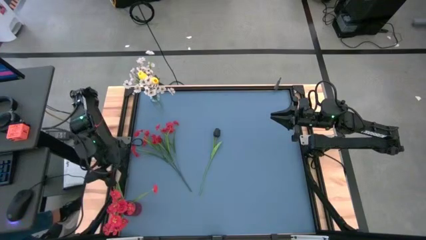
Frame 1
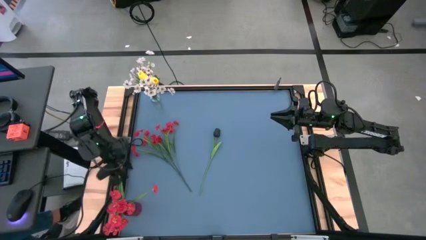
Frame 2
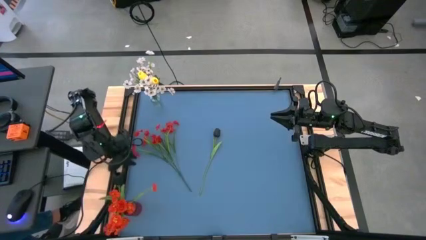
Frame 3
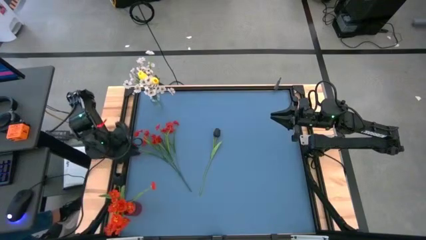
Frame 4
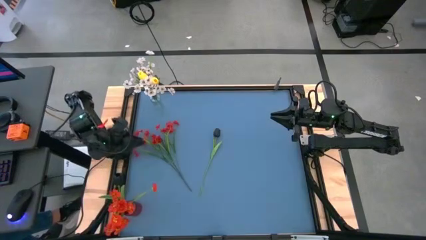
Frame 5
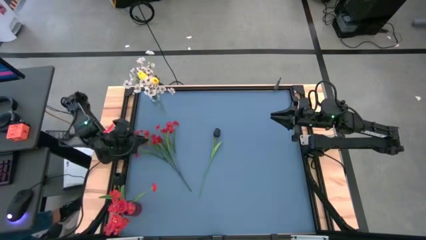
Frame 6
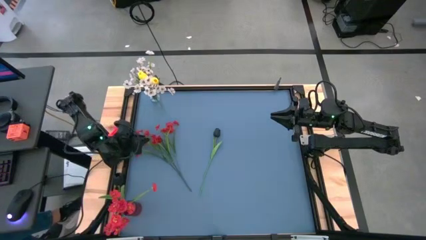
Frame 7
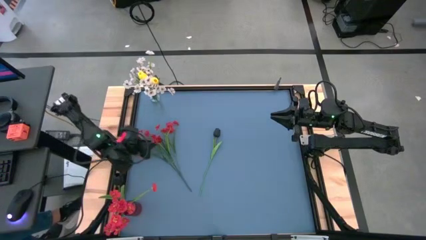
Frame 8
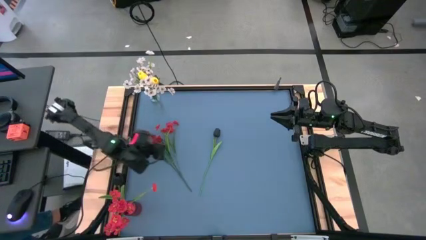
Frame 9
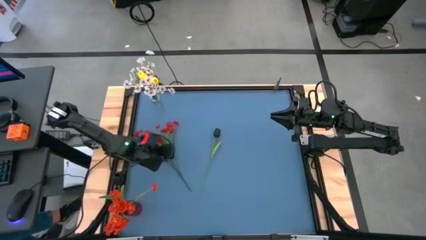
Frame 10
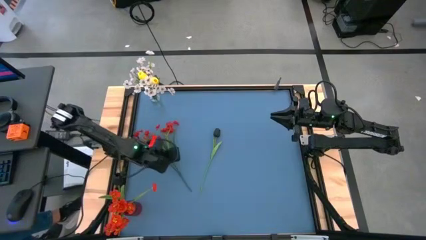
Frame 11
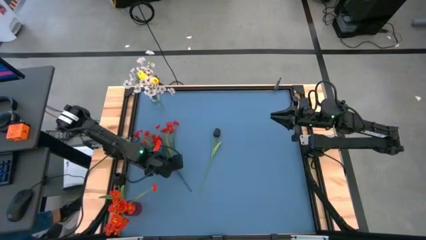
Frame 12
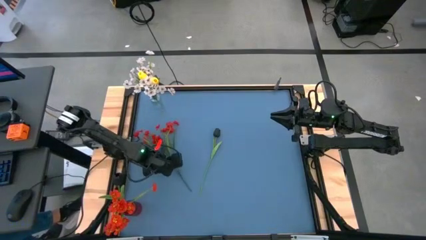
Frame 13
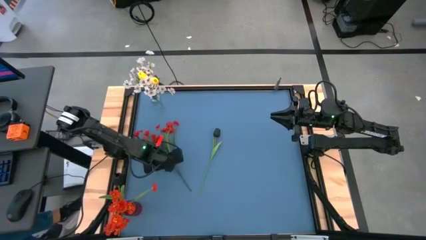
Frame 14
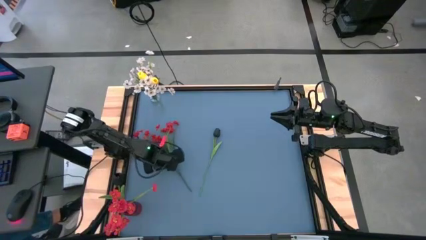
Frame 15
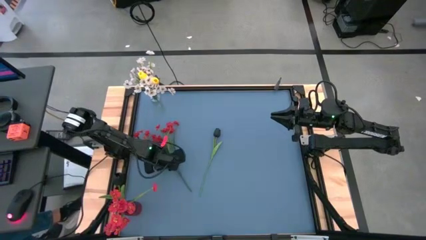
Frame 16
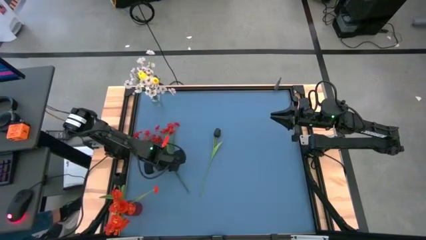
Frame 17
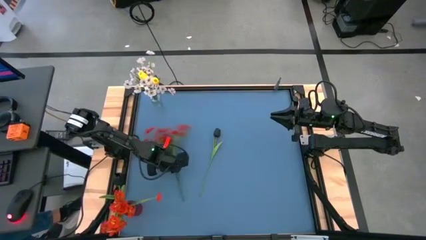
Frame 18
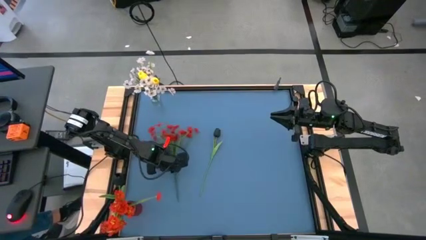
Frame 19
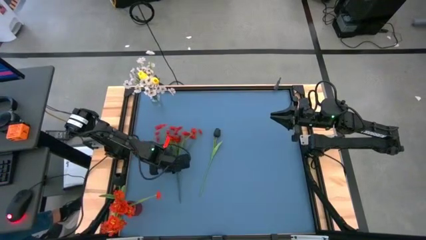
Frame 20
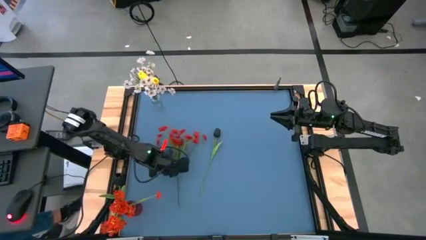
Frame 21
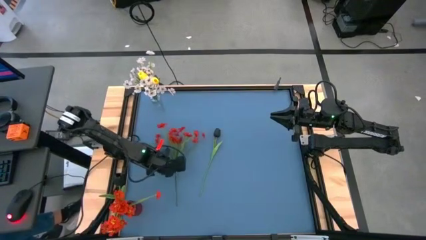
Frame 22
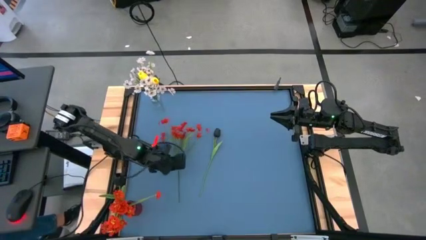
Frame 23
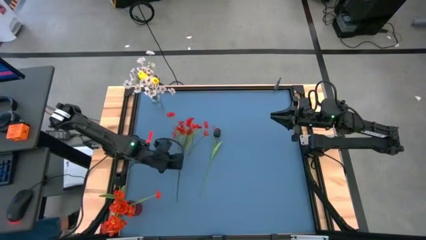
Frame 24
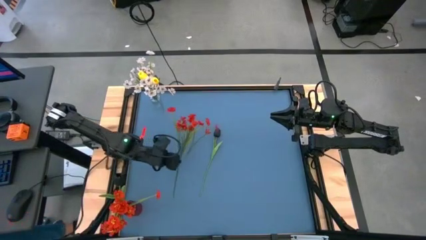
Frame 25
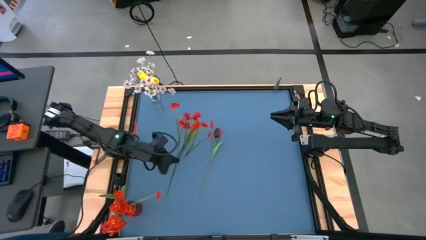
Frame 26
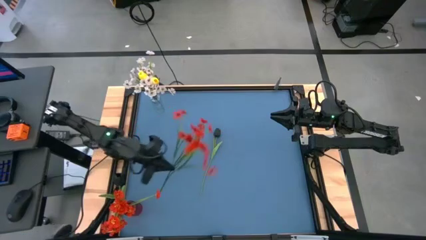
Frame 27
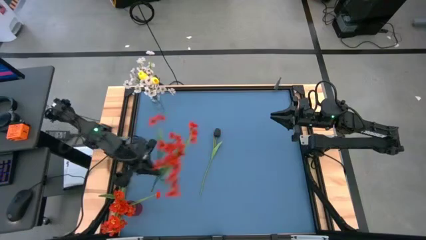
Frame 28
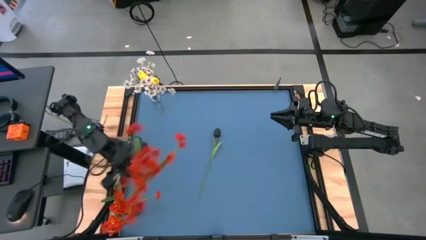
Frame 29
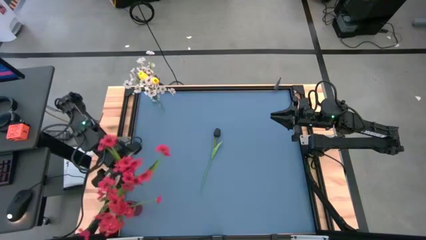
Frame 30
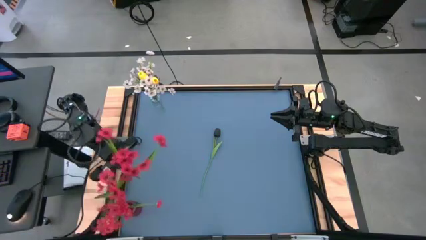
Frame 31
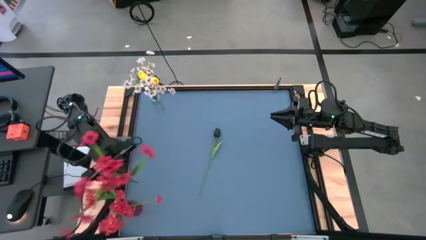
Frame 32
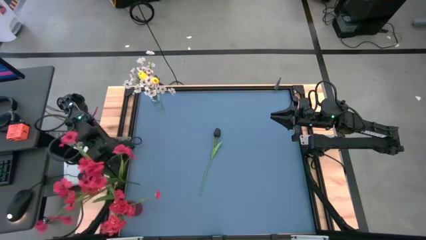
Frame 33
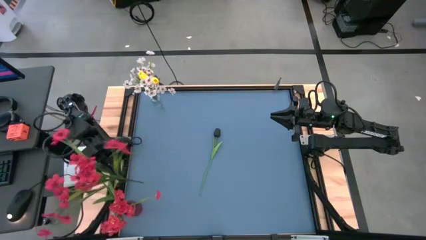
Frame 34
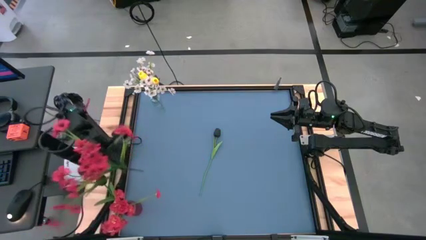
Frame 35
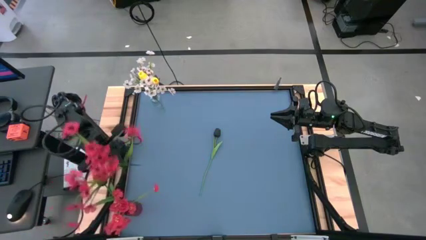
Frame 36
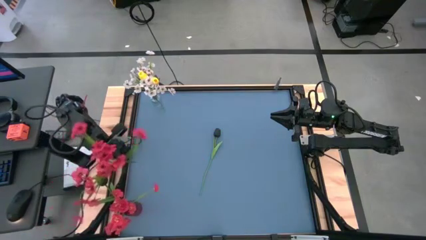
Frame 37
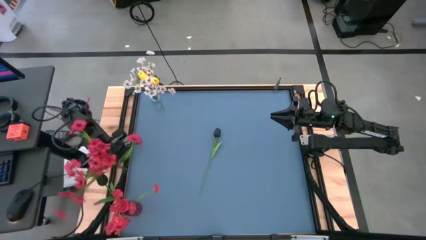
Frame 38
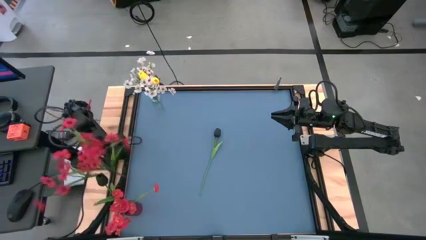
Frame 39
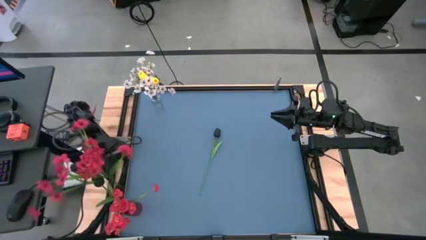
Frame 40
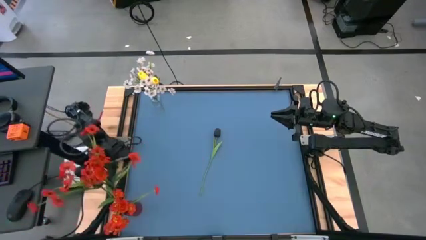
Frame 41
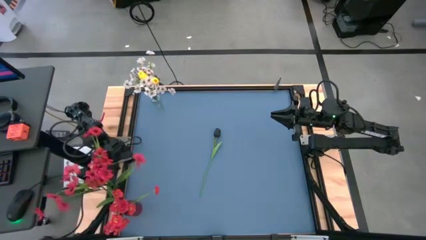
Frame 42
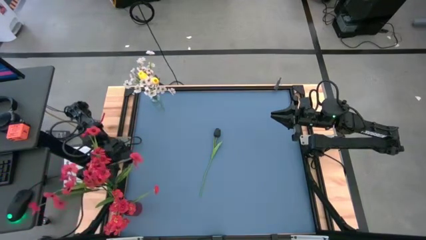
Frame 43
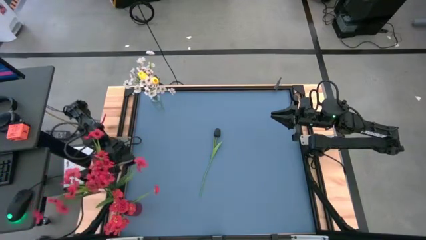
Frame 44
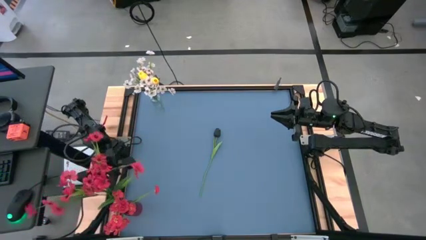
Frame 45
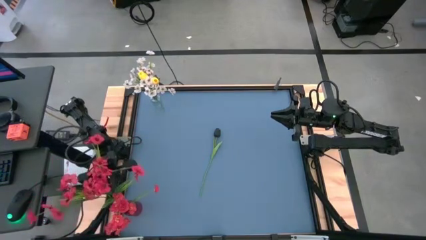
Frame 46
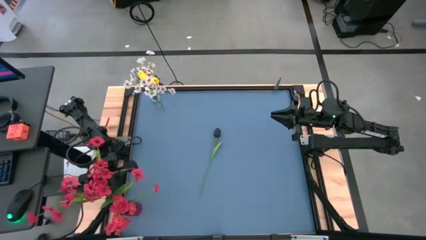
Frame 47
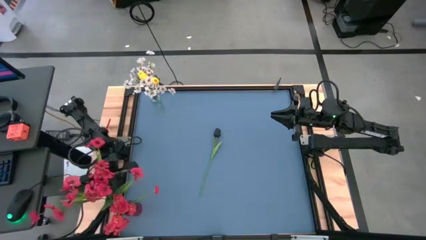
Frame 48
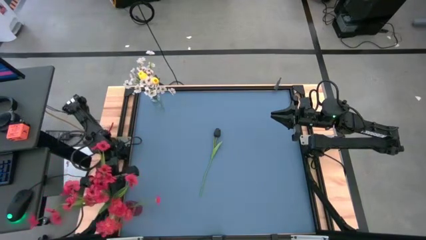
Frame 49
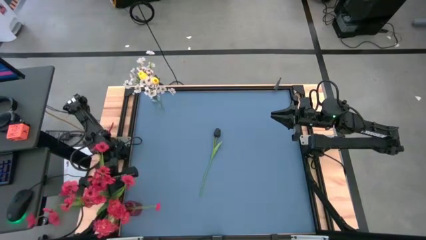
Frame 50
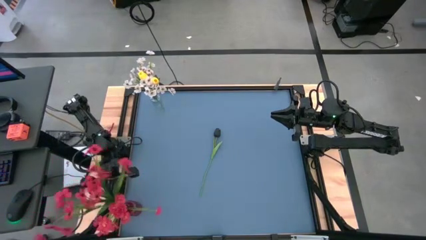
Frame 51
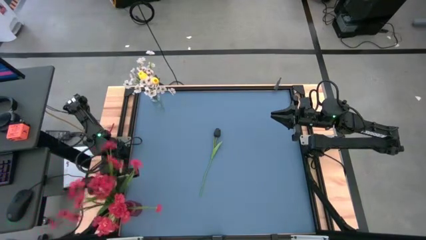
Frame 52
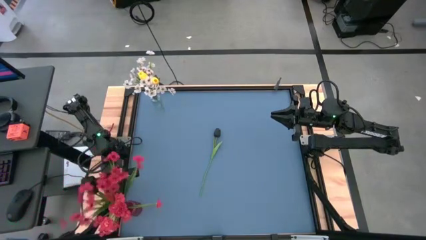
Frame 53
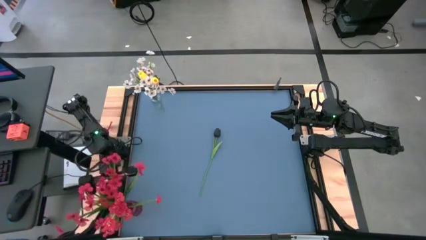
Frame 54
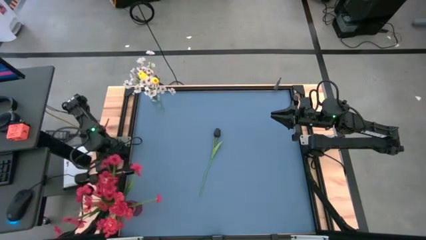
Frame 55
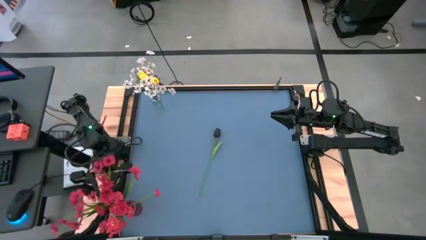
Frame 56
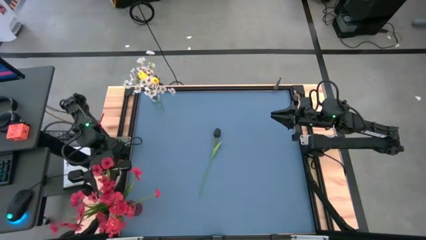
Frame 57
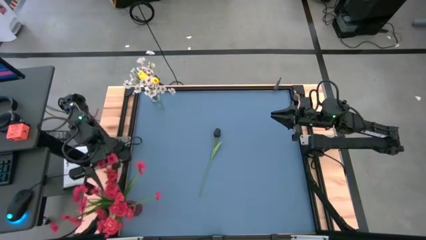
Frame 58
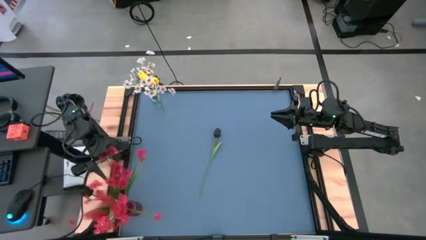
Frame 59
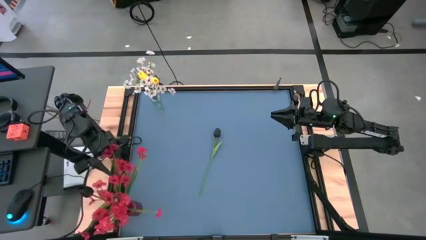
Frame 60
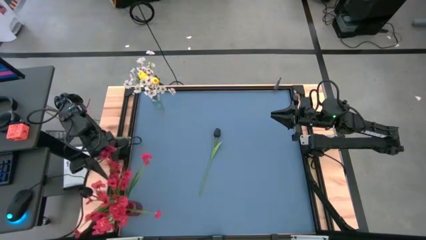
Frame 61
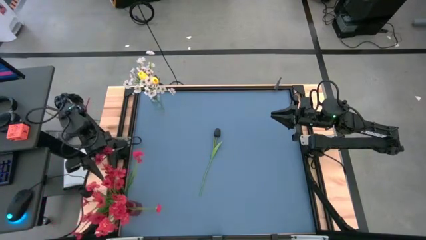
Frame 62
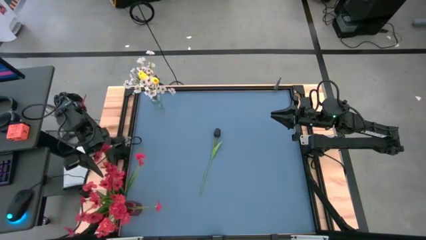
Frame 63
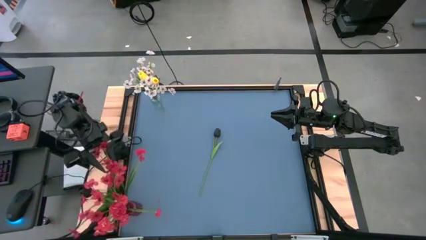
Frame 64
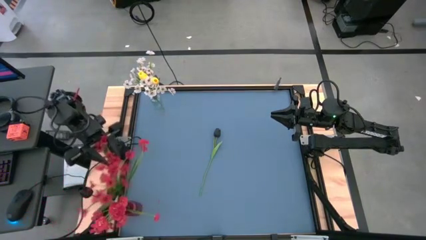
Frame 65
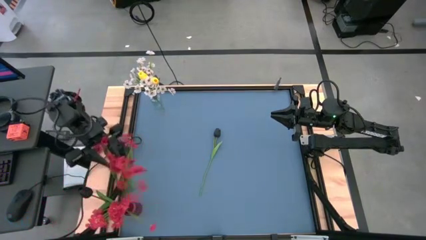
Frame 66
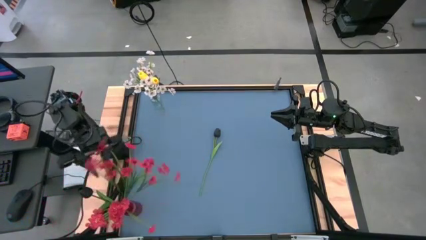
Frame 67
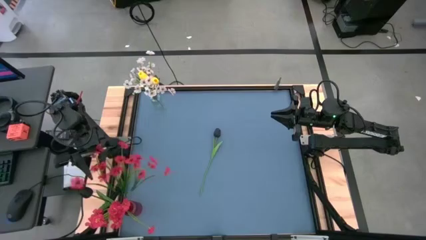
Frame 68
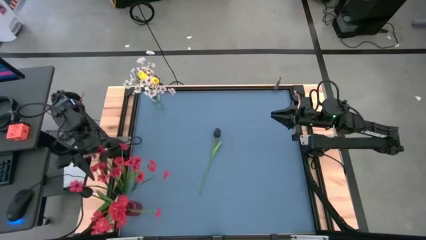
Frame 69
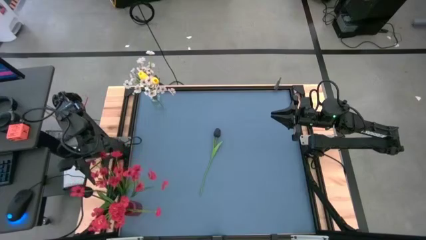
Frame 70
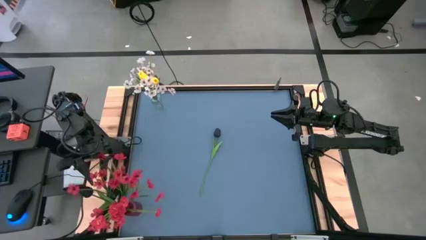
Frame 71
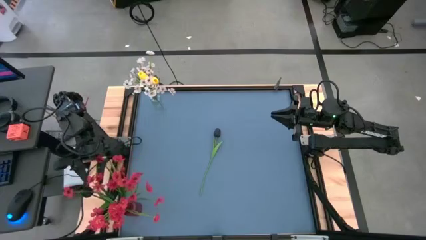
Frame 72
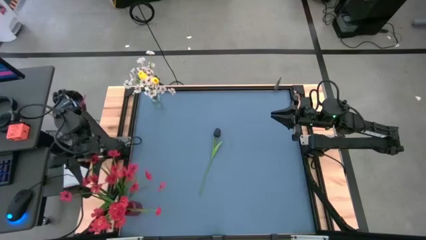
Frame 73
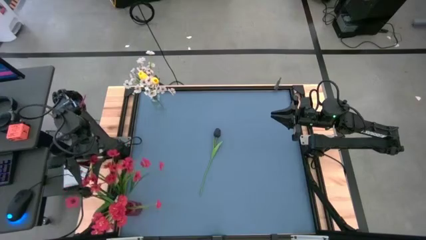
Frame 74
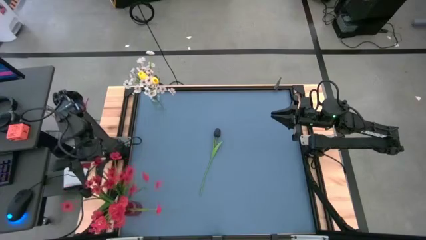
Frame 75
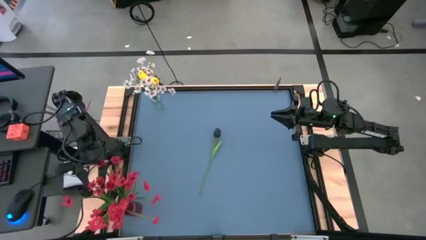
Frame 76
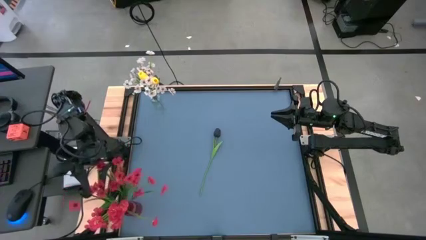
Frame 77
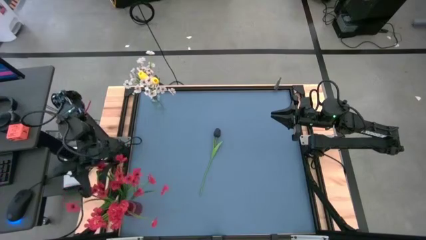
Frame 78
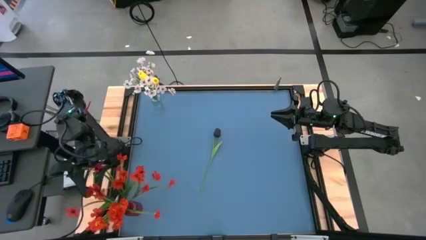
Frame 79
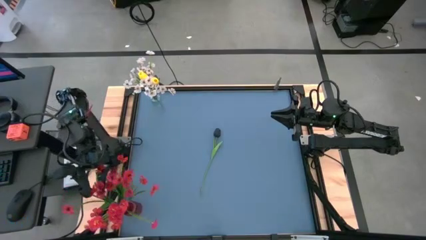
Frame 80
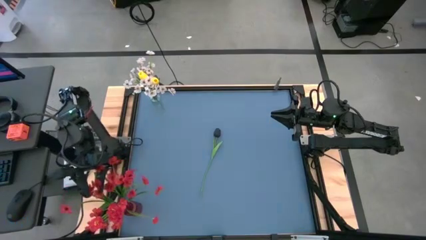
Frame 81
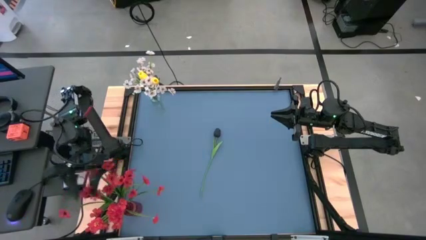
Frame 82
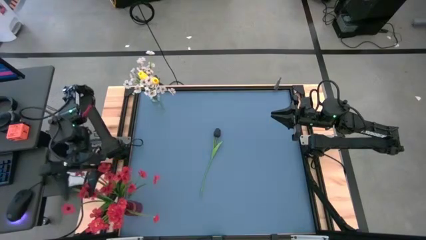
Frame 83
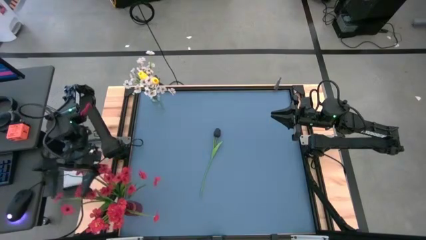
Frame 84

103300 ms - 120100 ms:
Task: Sort flowers into vase by color
Put the red flowers into the red vase
